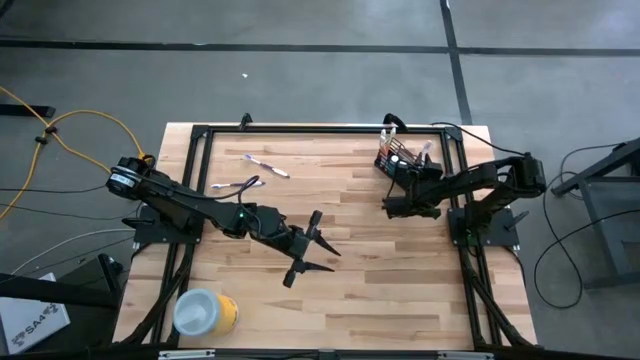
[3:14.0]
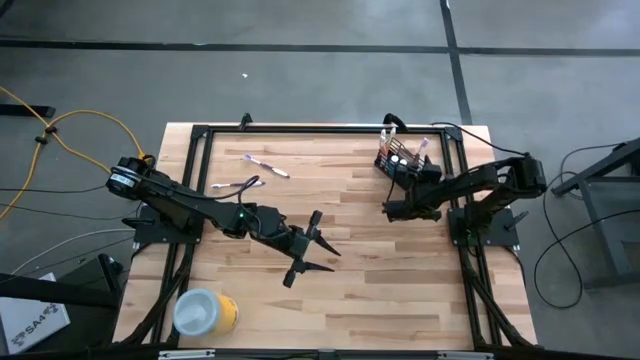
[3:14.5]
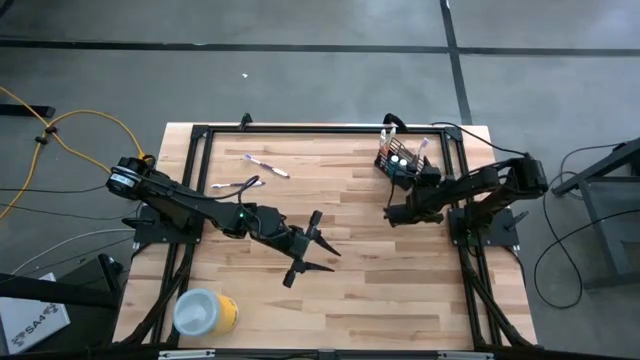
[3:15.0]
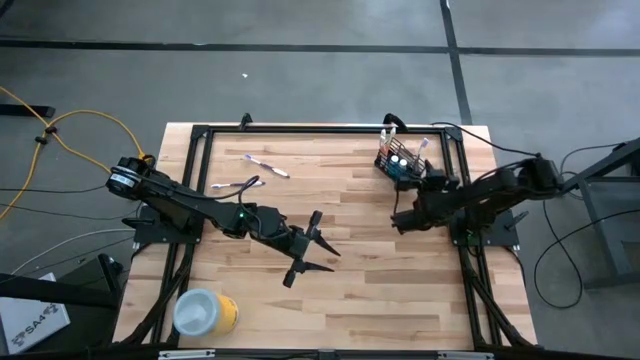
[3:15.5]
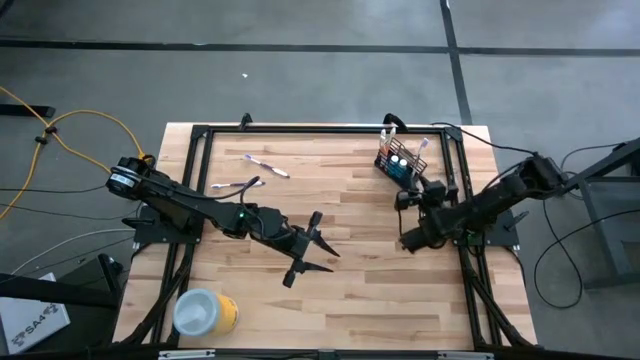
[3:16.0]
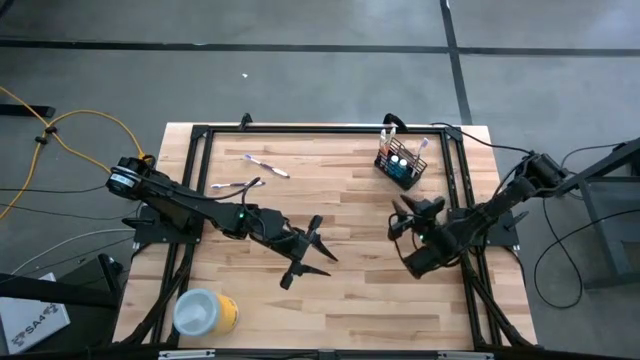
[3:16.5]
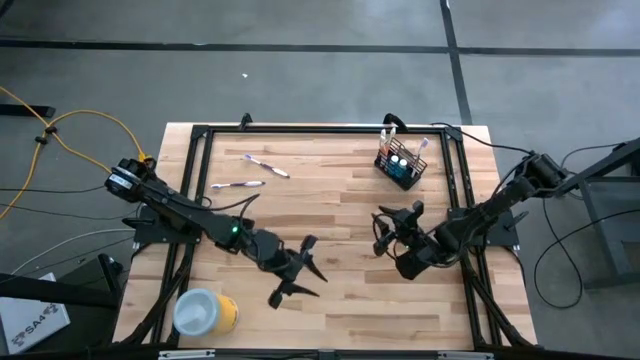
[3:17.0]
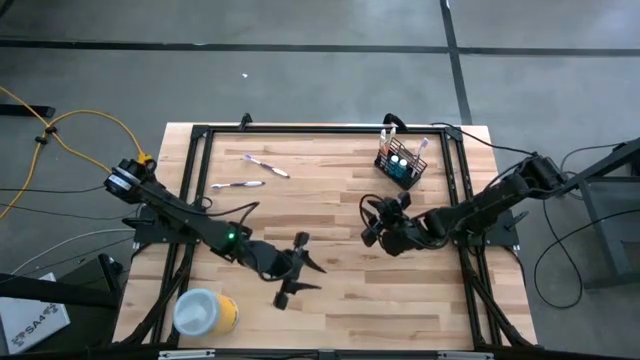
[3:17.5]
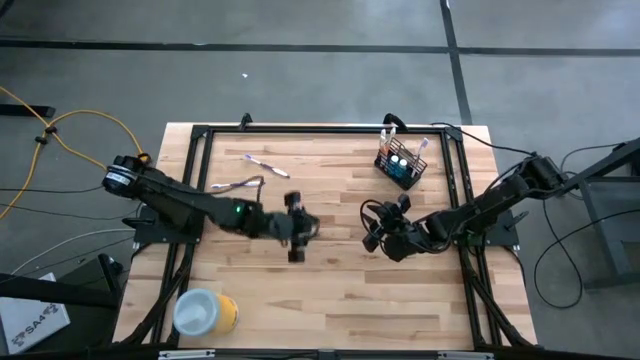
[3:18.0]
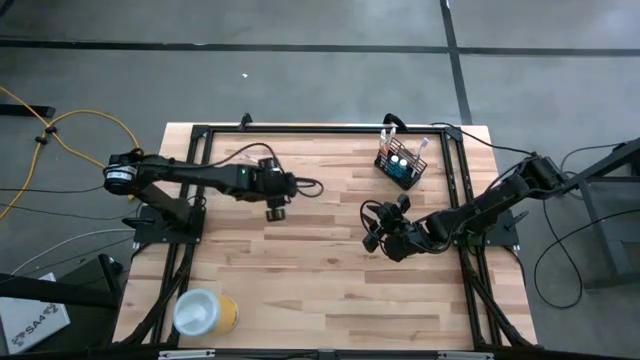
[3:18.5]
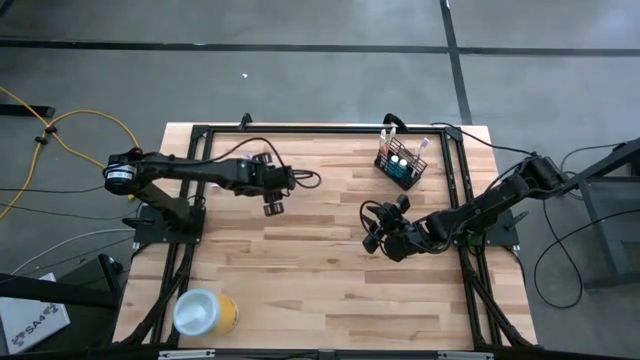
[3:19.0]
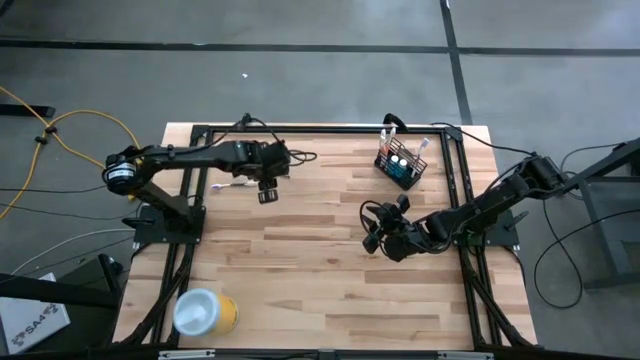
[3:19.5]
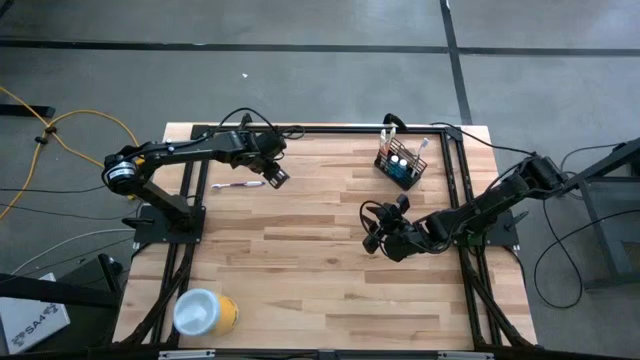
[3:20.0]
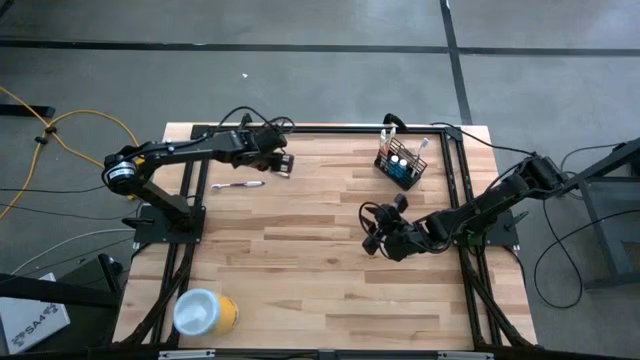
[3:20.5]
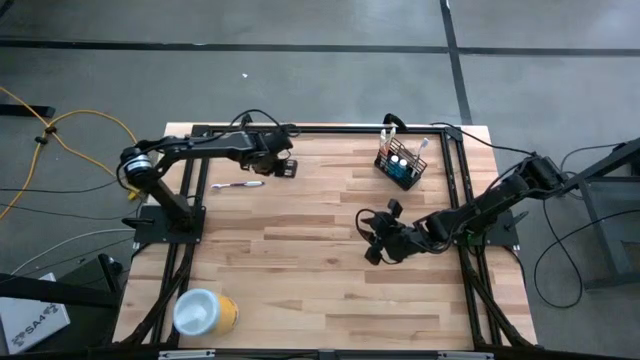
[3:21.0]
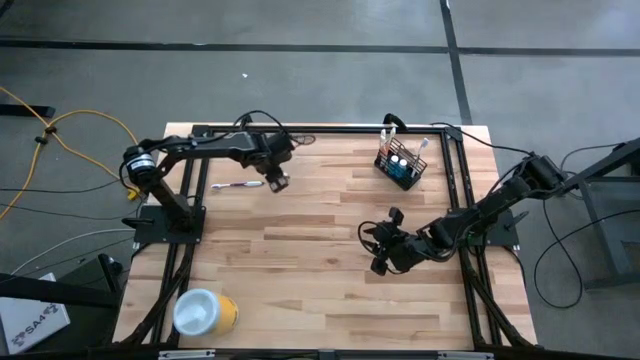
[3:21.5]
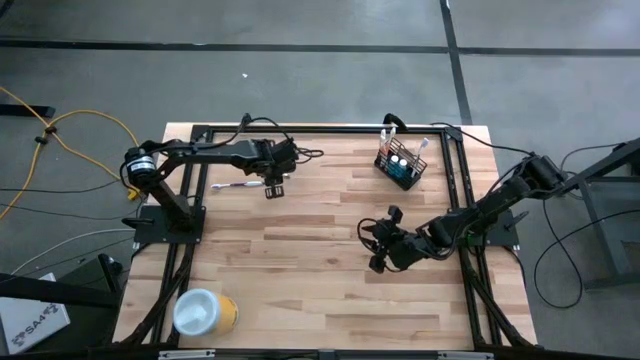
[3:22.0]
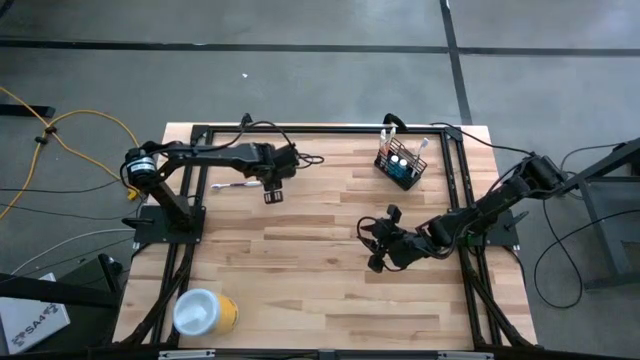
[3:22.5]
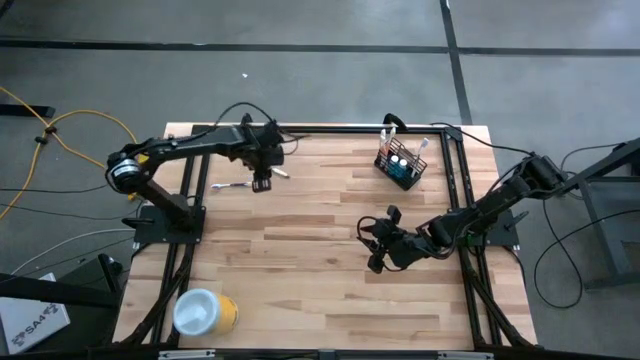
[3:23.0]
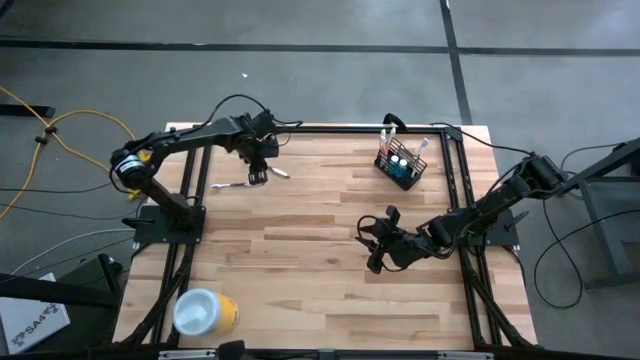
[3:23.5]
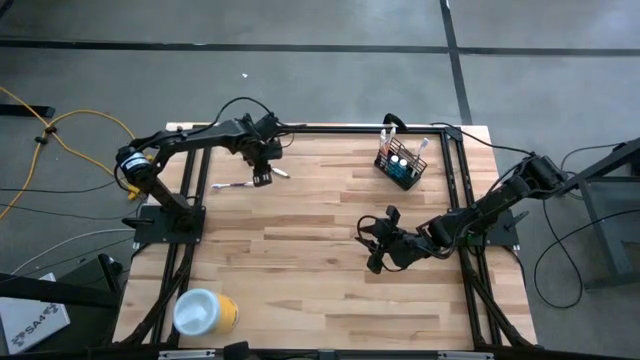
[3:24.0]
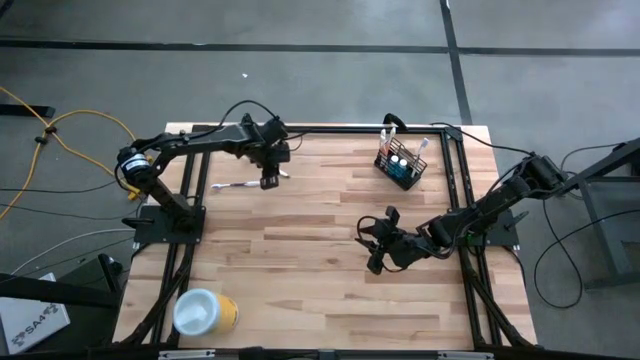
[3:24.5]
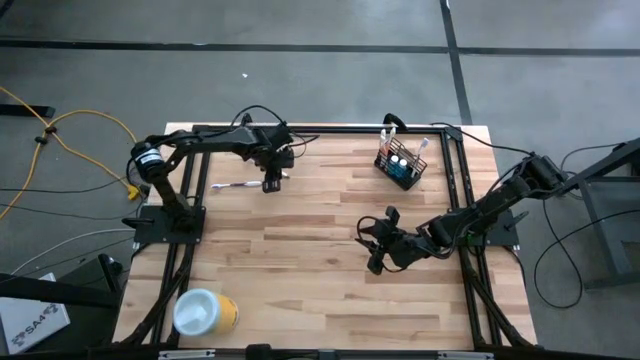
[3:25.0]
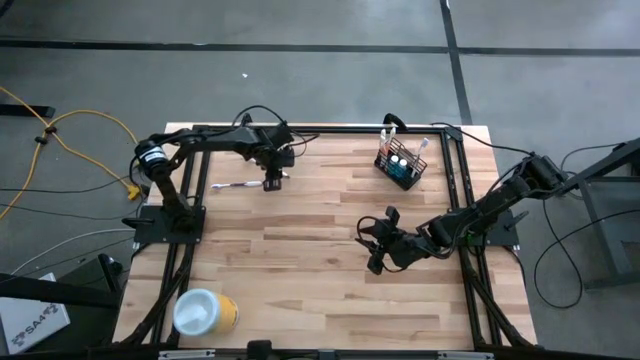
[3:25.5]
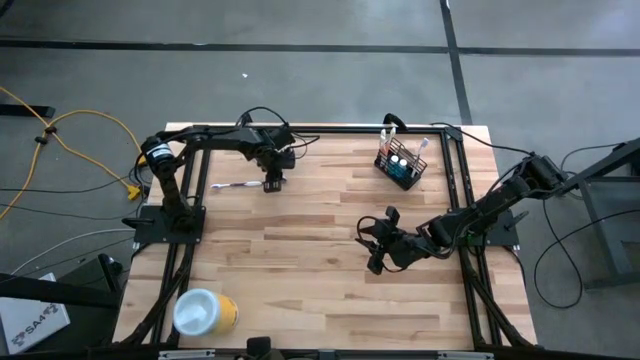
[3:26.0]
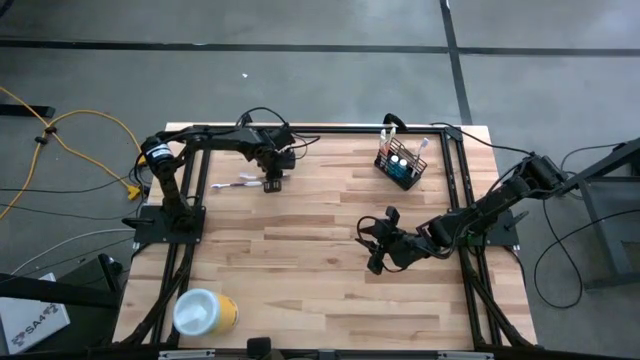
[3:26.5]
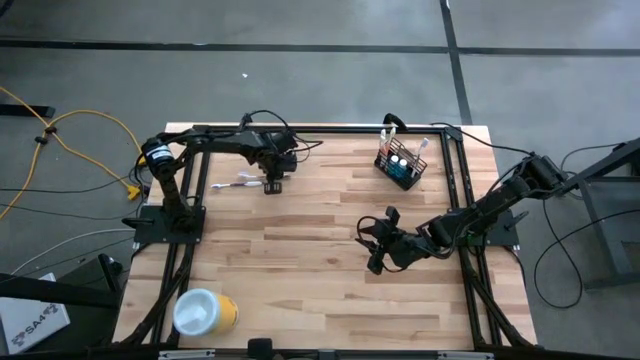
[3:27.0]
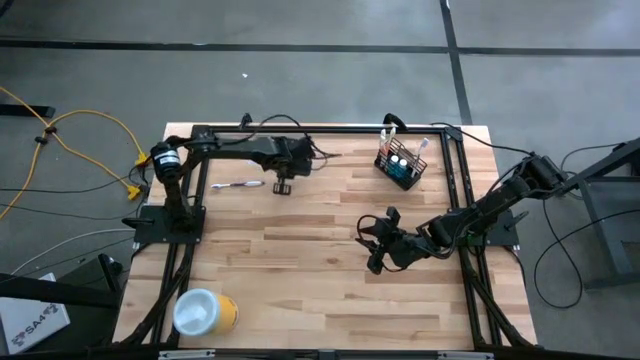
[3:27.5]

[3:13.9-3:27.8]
Task: Pick & Place toothbrushing station
Put the top purple toothbrush into the right of the black mesh organizer
